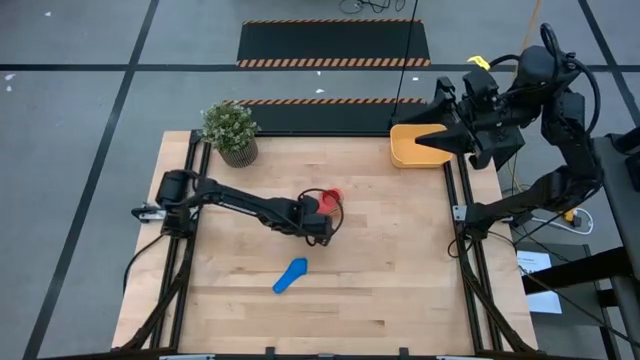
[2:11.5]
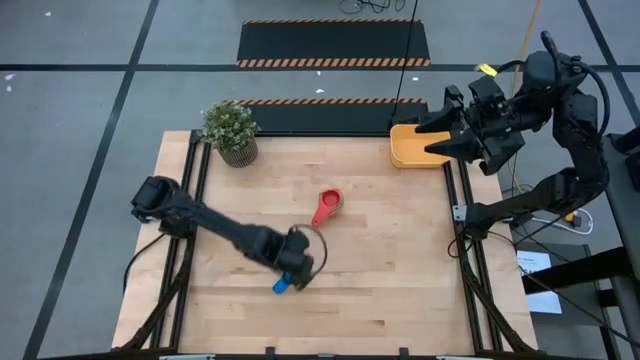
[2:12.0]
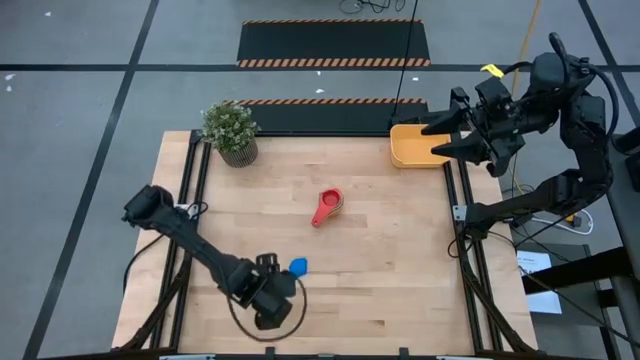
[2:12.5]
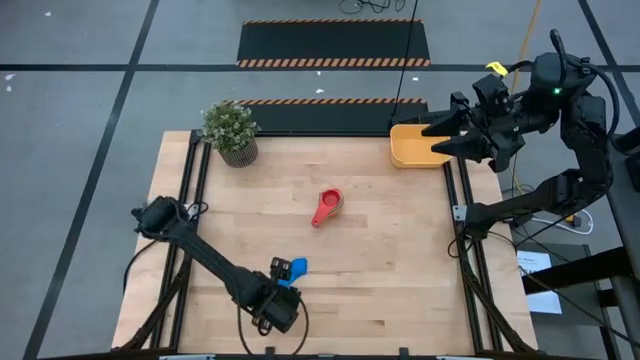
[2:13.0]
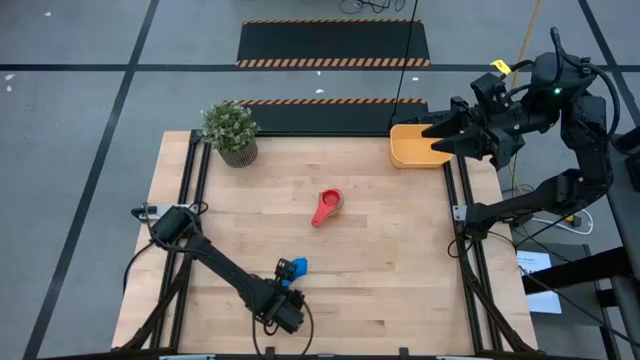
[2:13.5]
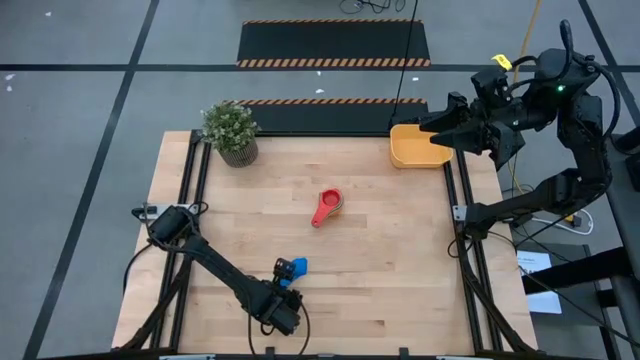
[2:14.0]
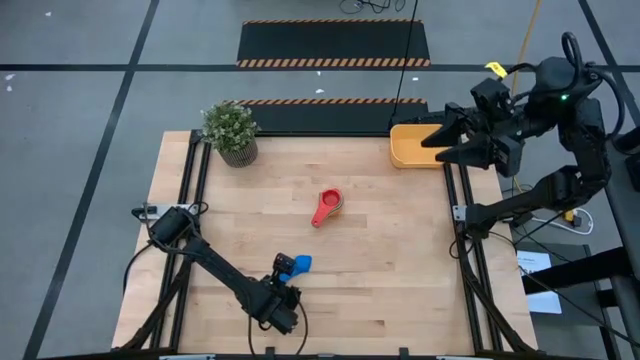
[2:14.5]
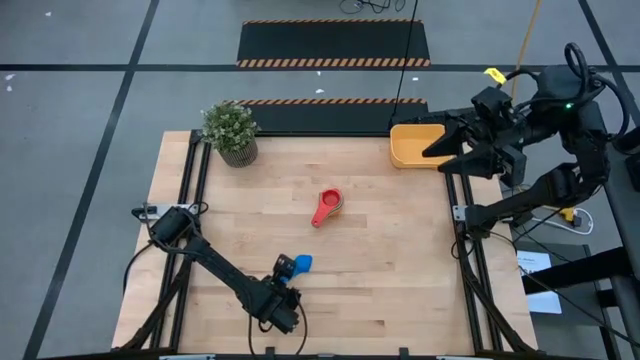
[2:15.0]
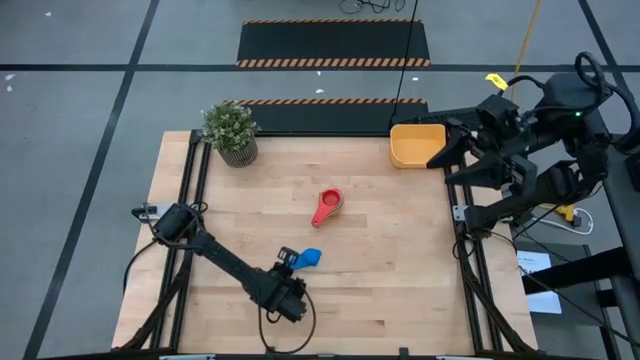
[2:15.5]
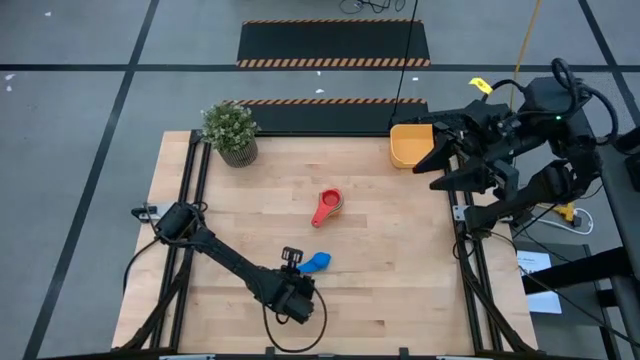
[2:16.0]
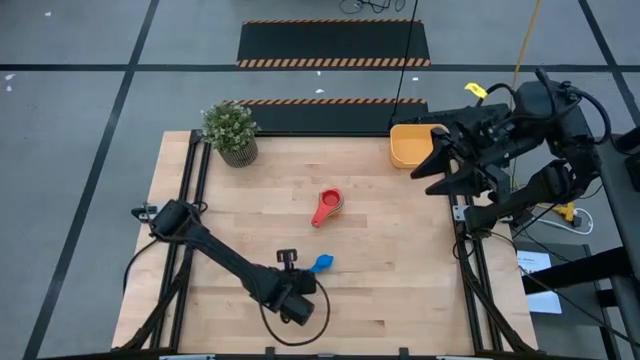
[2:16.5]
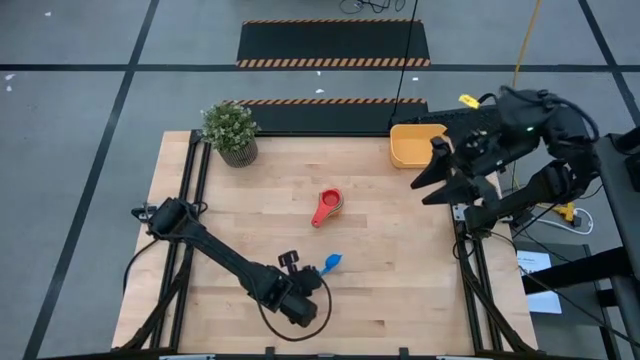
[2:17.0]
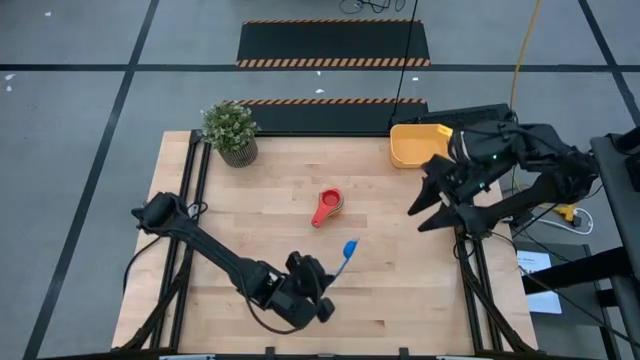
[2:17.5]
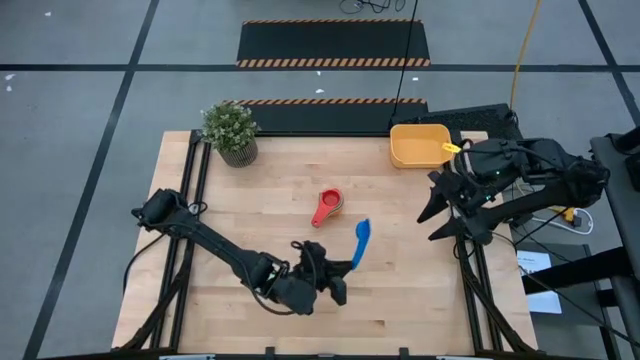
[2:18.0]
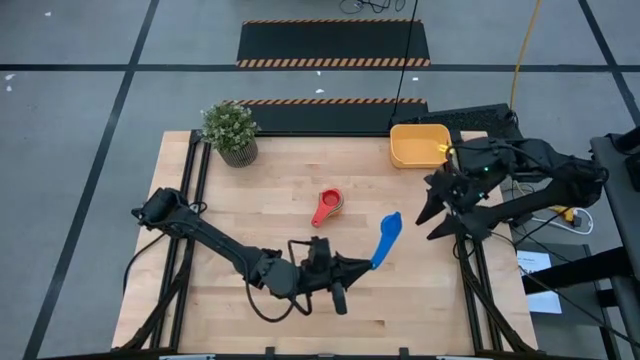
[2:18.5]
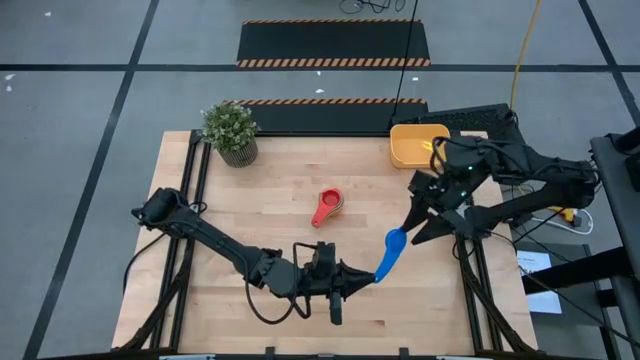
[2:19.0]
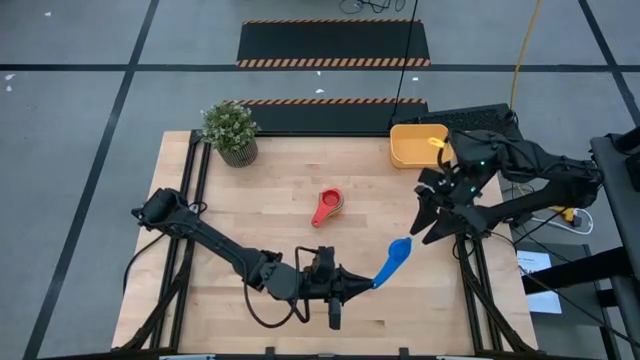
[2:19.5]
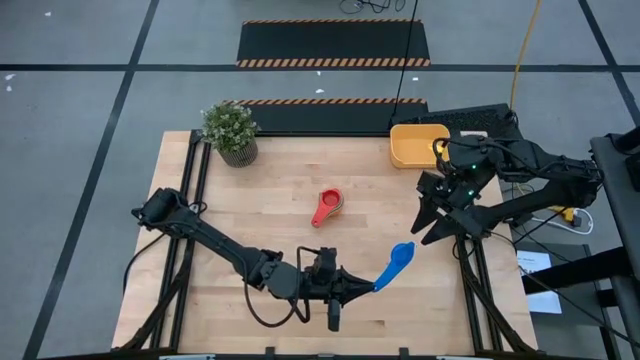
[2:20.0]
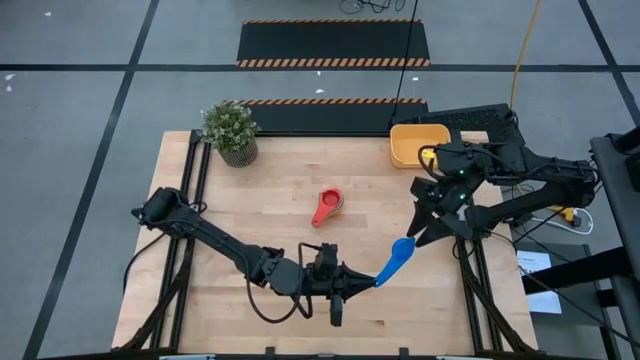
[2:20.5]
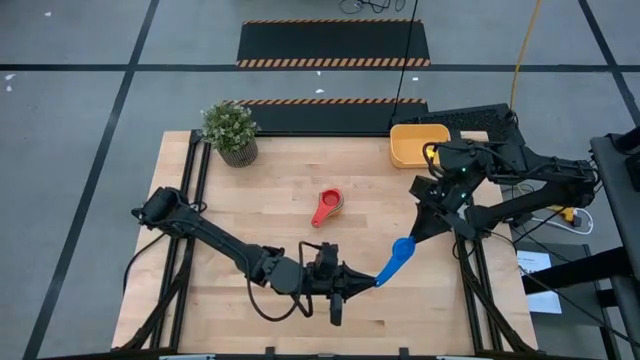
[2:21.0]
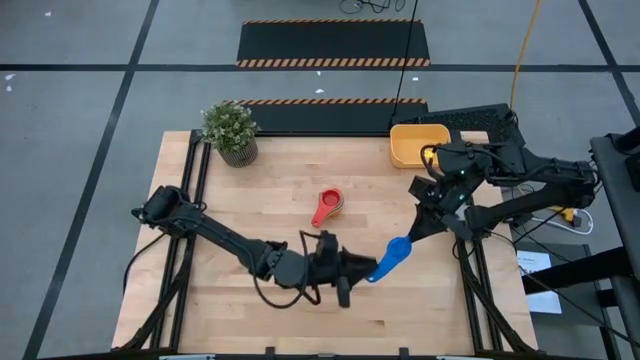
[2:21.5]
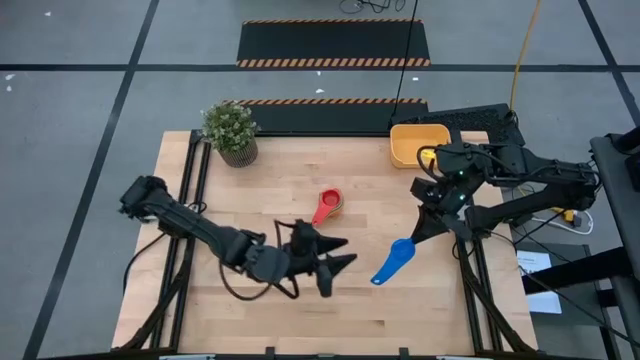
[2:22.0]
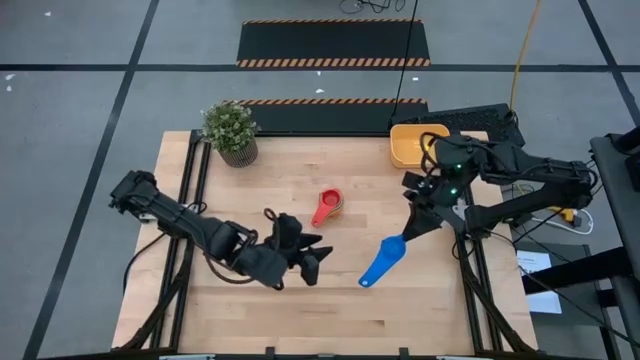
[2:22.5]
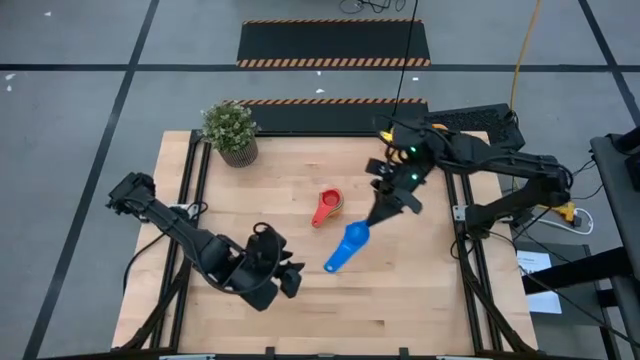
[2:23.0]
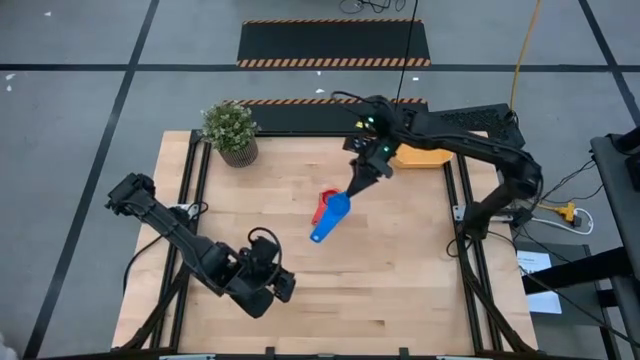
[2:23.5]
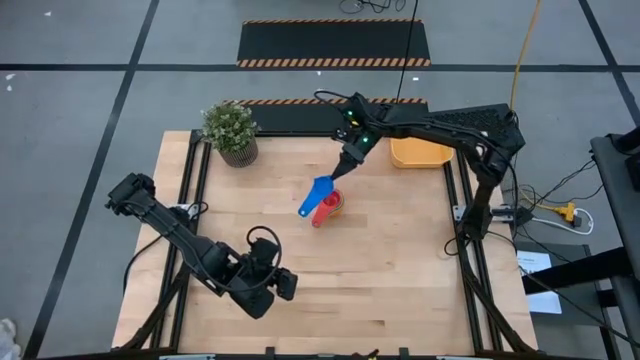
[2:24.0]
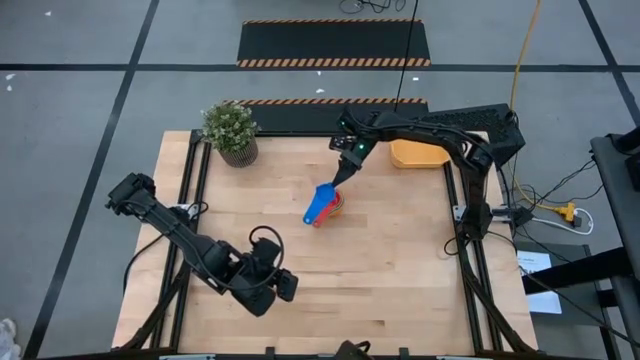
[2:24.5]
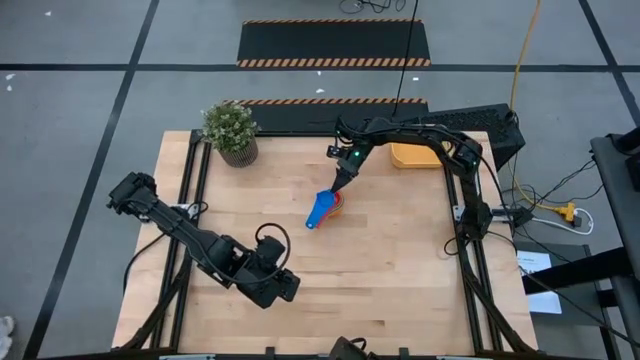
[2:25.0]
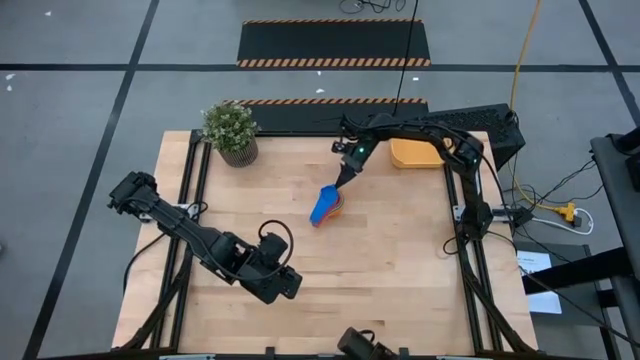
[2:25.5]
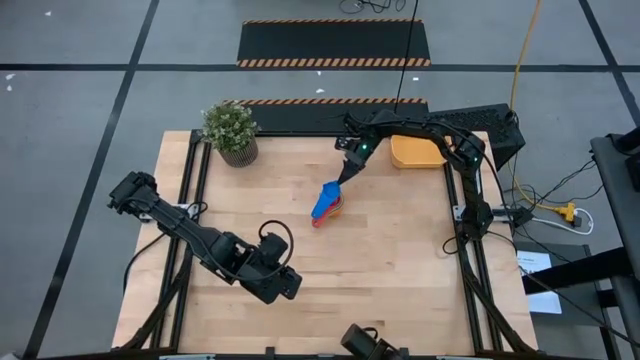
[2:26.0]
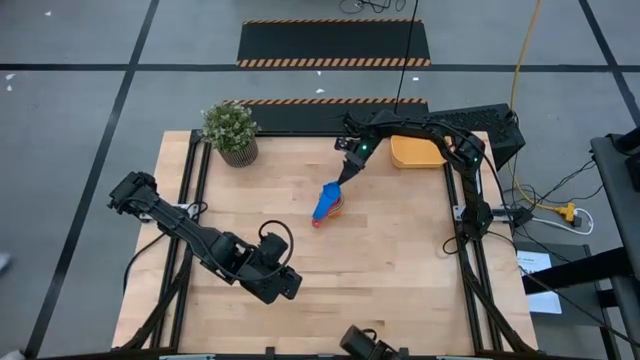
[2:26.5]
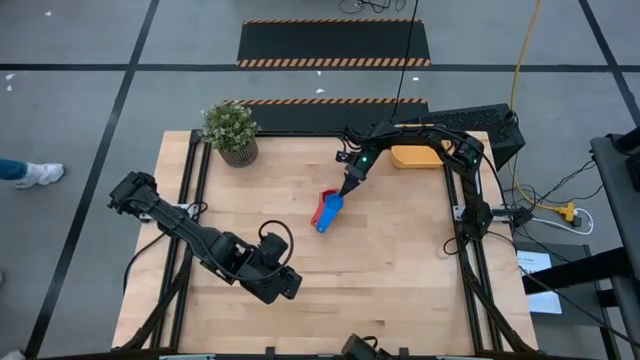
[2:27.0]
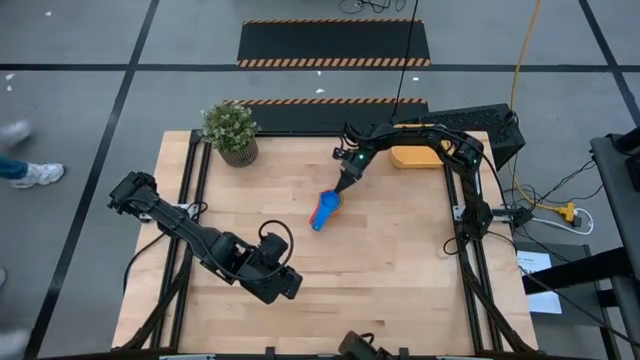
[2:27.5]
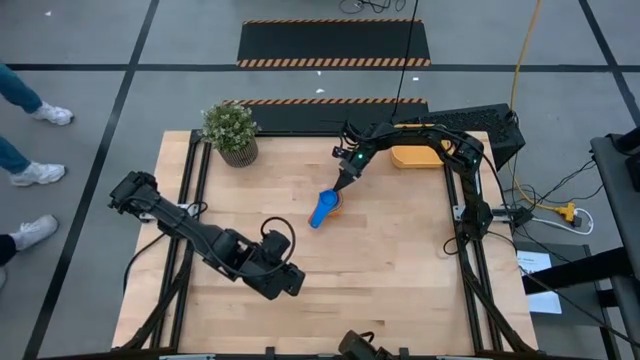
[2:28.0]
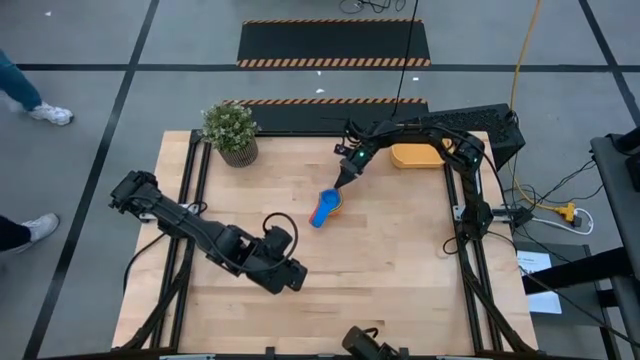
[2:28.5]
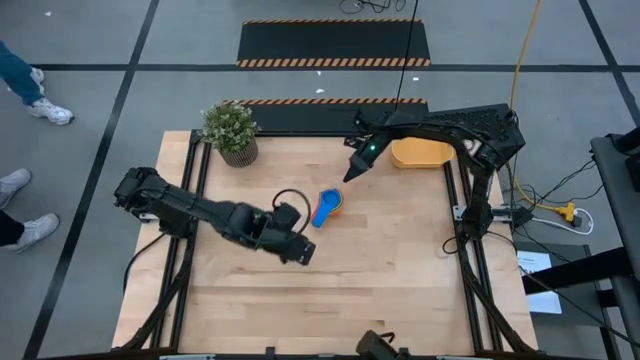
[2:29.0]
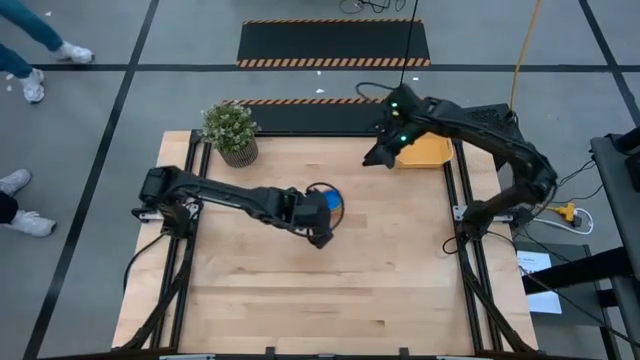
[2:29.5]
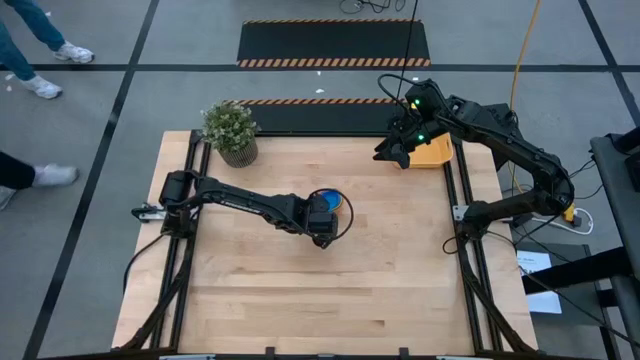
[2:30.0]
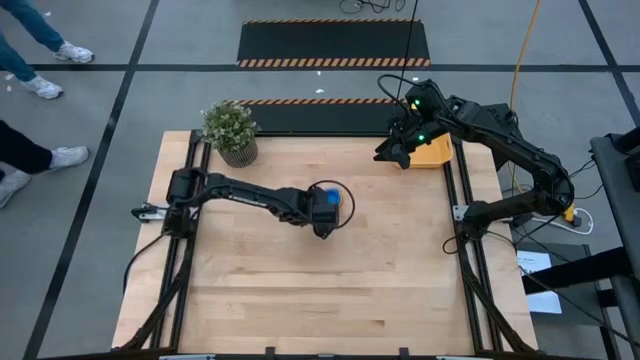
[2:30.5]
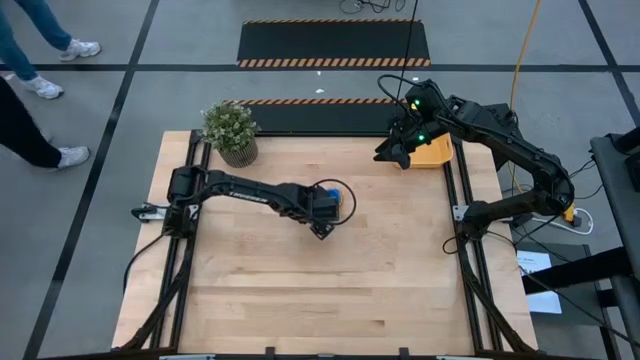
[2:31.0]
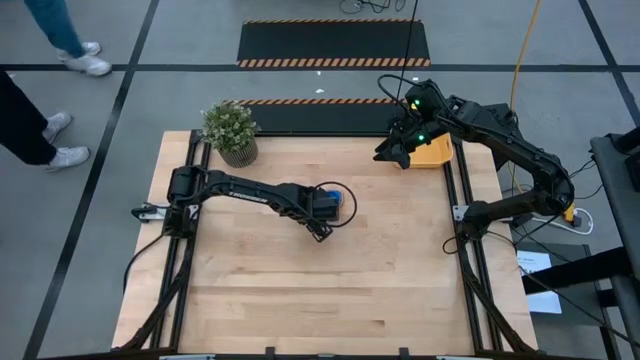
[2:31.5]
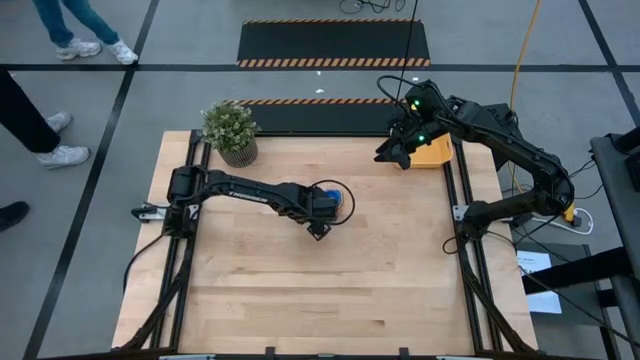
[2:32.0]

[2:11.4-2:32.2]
Task: Nest measuring cups in basket
Stack the blue measuring cup on top of the red measuring cup on the table

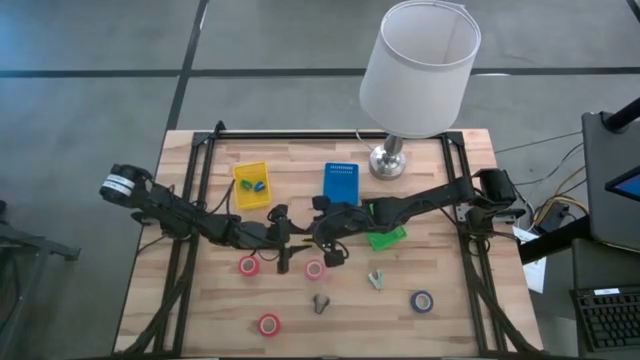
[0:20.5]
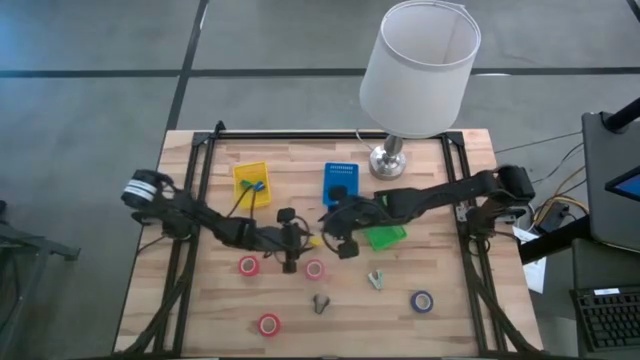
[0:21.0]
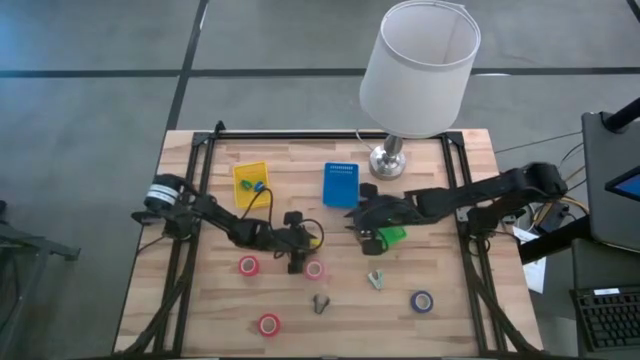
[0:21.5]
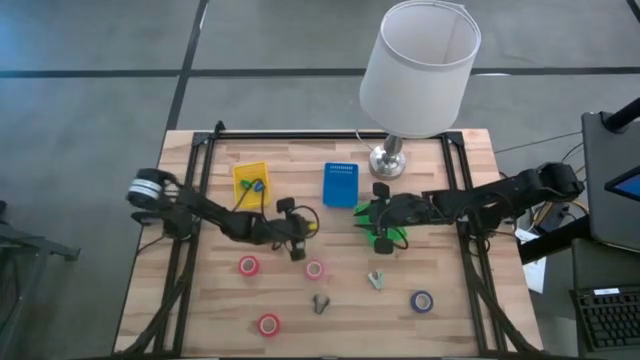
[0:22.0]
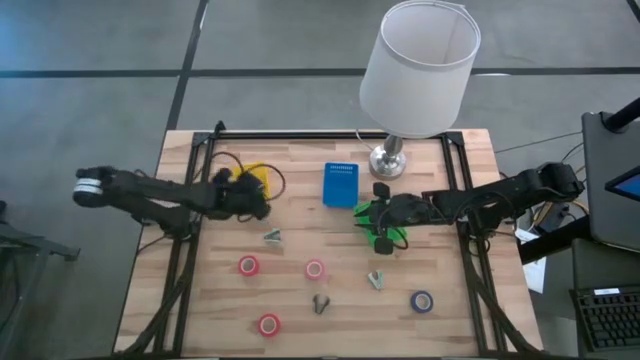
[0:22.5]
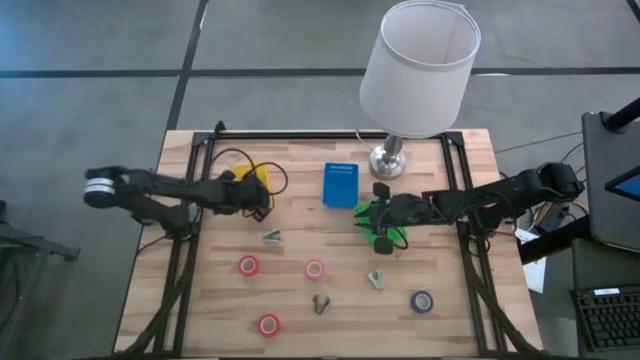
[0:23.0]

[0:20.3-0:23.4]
Task: Pick and place Stapler, Stapler remover, tape
Put the yellow stapler into the yellow basket
